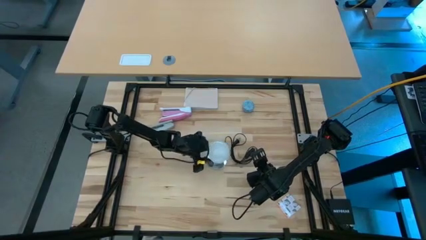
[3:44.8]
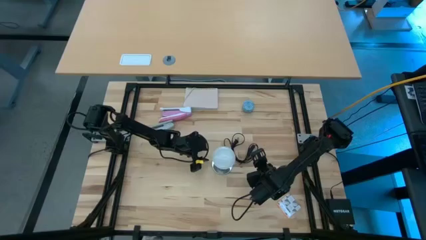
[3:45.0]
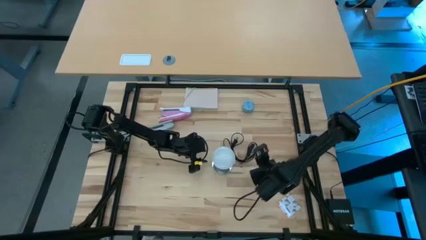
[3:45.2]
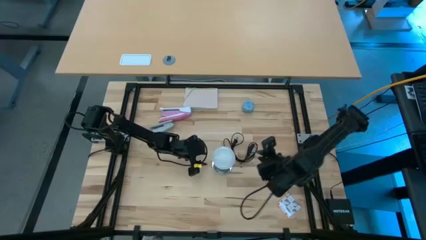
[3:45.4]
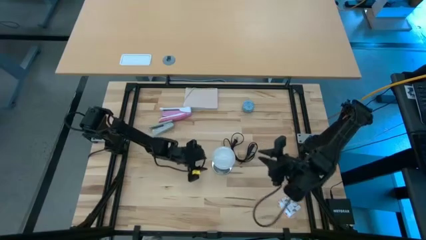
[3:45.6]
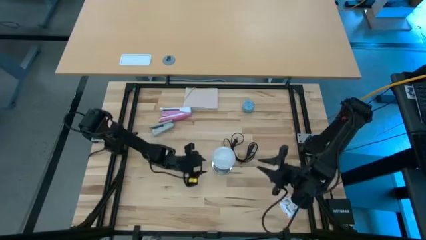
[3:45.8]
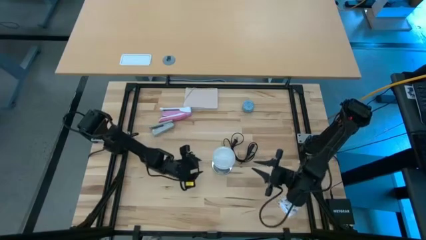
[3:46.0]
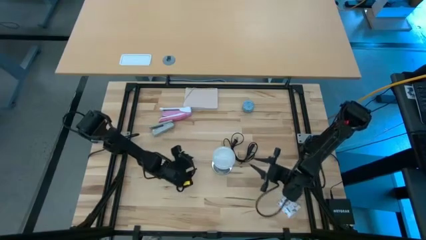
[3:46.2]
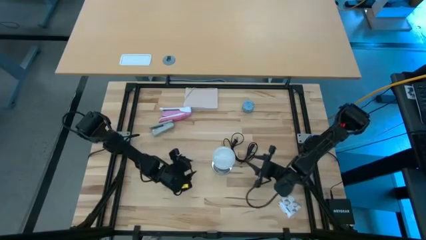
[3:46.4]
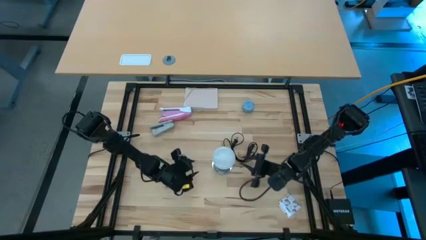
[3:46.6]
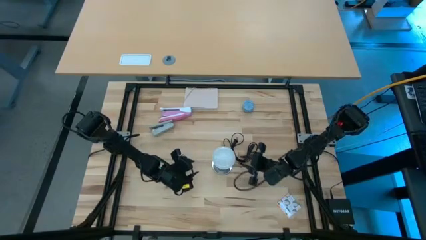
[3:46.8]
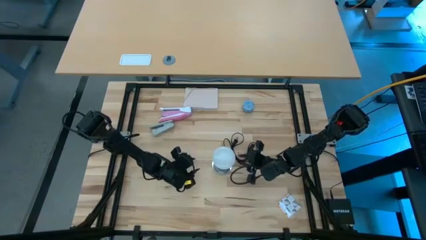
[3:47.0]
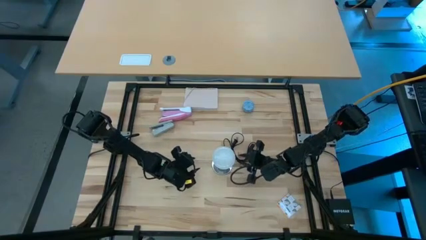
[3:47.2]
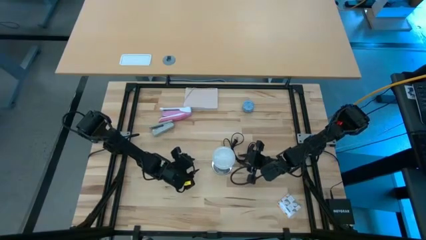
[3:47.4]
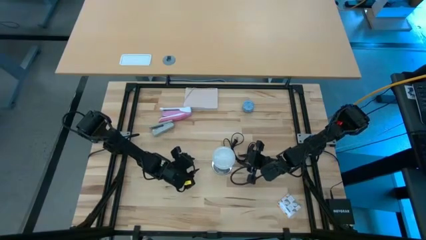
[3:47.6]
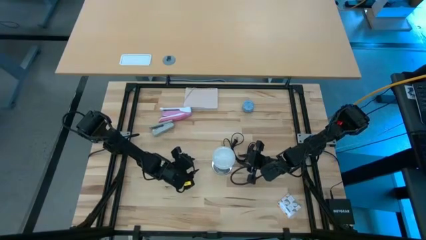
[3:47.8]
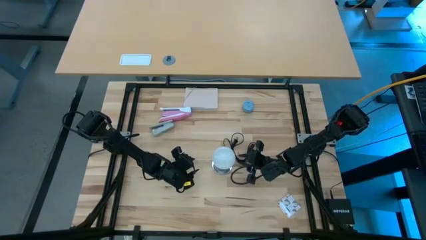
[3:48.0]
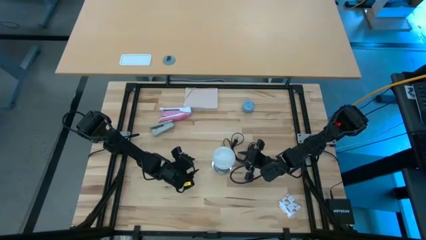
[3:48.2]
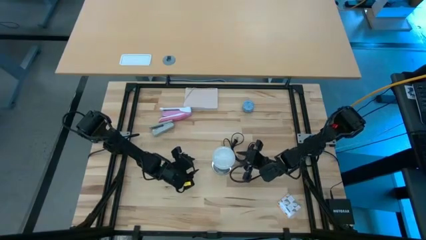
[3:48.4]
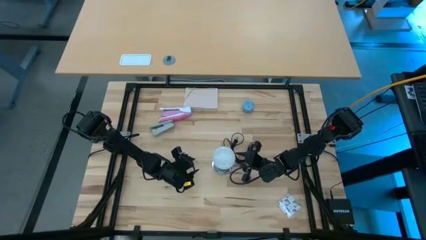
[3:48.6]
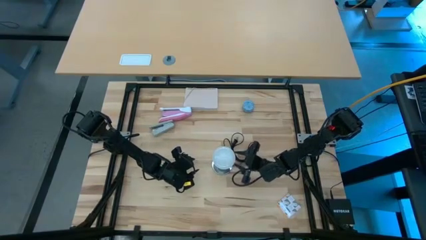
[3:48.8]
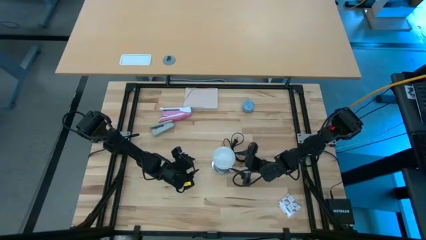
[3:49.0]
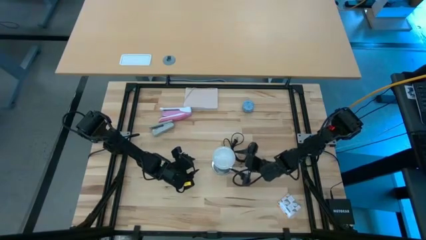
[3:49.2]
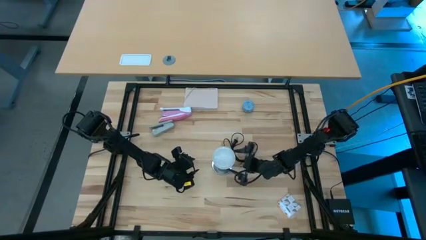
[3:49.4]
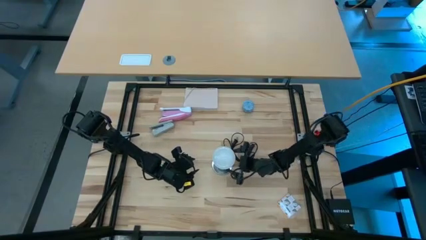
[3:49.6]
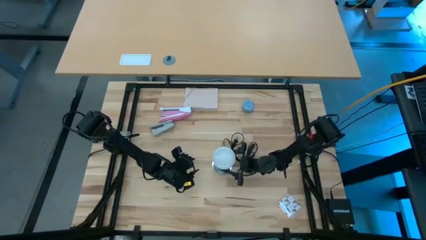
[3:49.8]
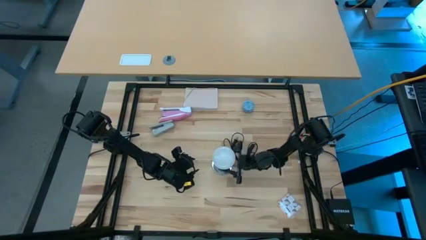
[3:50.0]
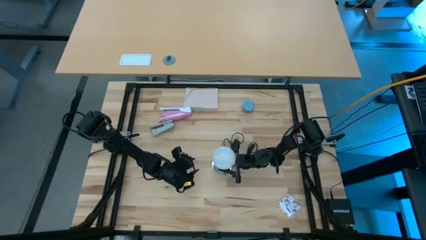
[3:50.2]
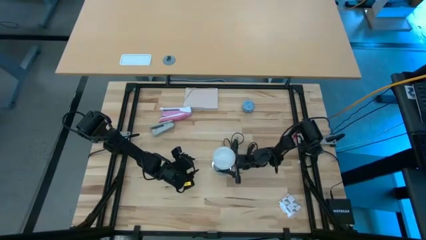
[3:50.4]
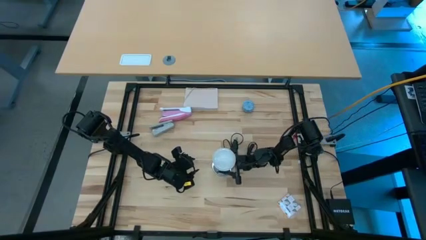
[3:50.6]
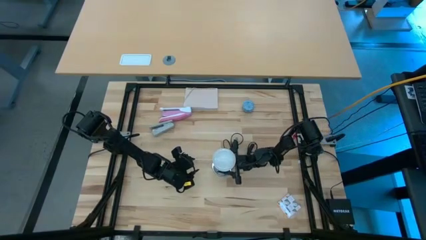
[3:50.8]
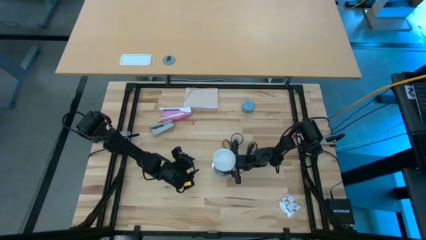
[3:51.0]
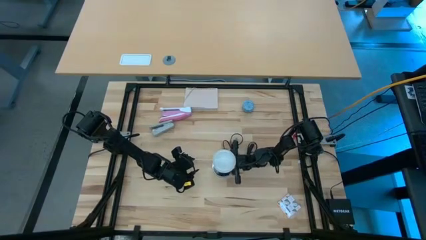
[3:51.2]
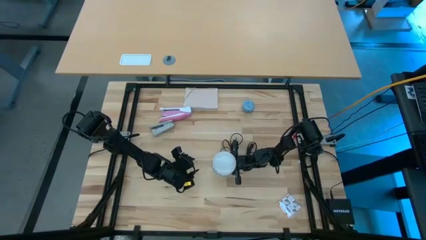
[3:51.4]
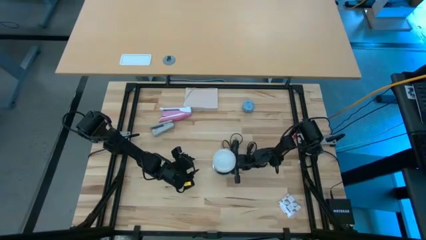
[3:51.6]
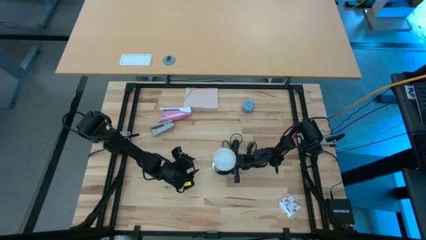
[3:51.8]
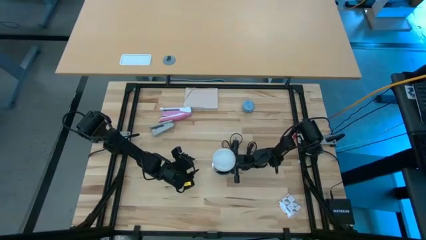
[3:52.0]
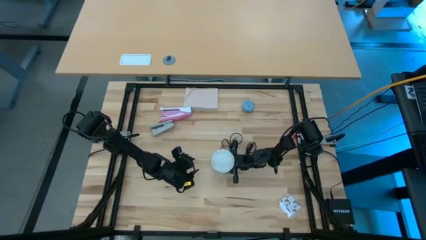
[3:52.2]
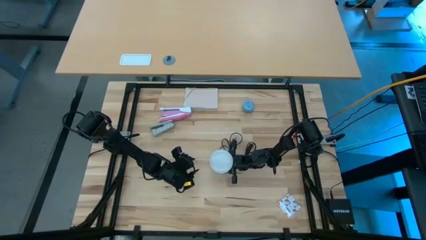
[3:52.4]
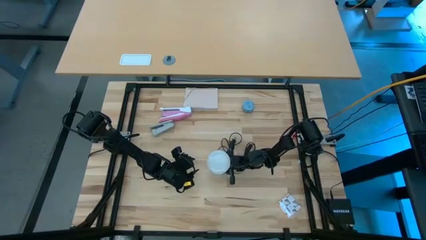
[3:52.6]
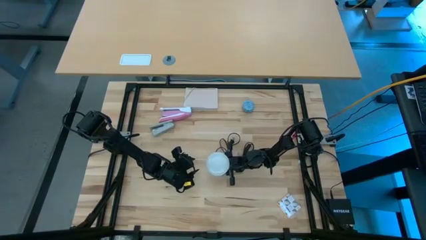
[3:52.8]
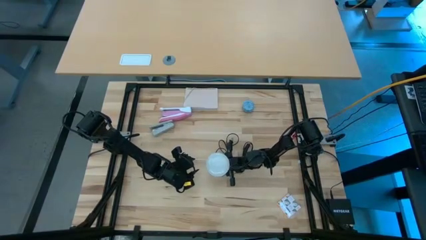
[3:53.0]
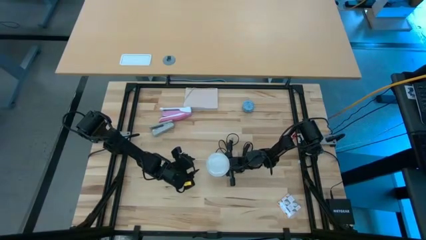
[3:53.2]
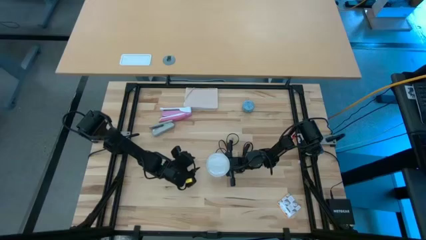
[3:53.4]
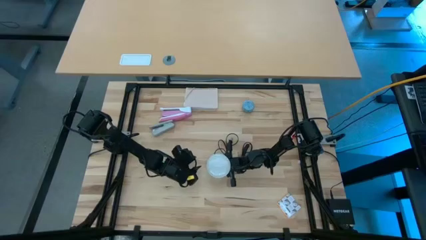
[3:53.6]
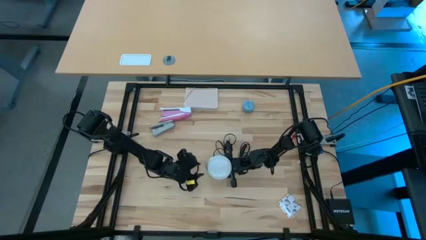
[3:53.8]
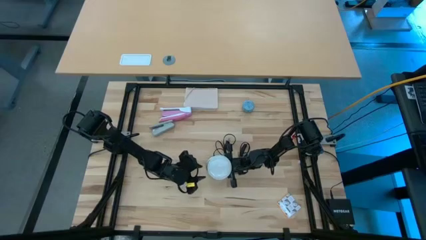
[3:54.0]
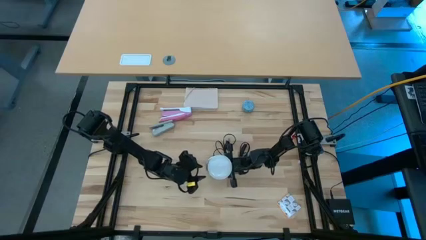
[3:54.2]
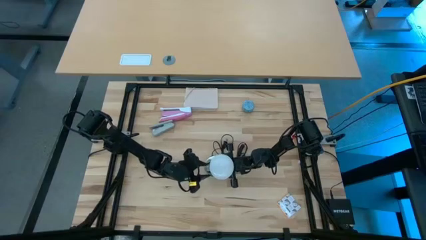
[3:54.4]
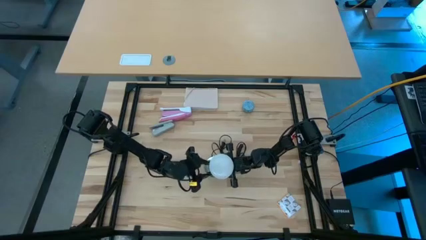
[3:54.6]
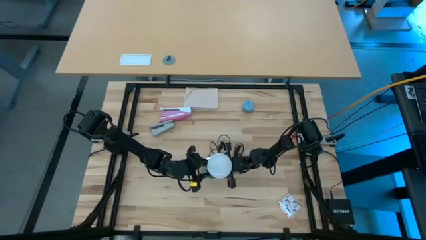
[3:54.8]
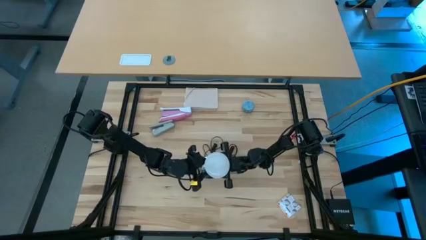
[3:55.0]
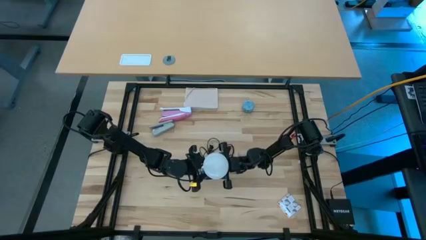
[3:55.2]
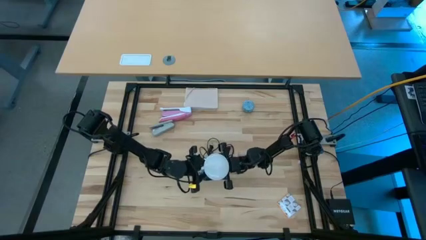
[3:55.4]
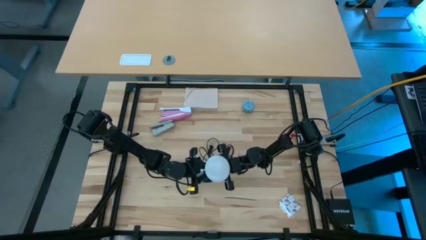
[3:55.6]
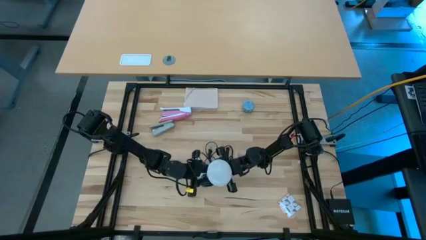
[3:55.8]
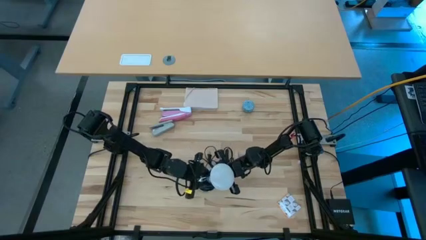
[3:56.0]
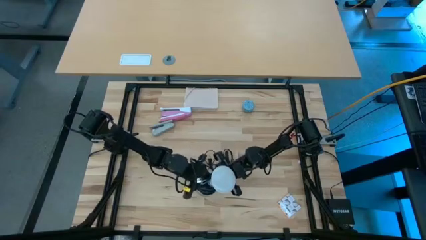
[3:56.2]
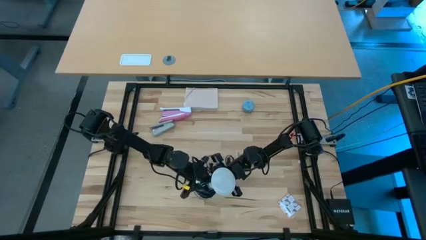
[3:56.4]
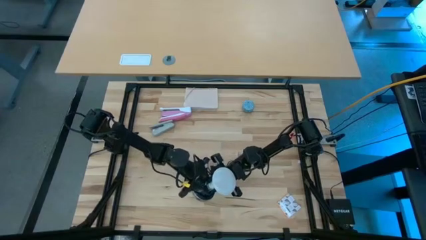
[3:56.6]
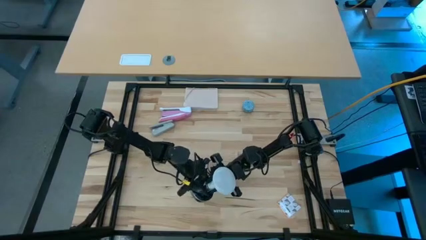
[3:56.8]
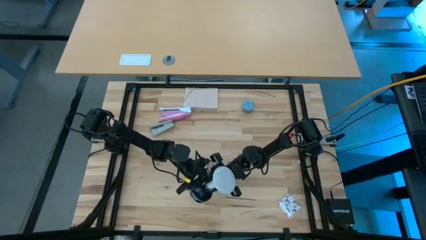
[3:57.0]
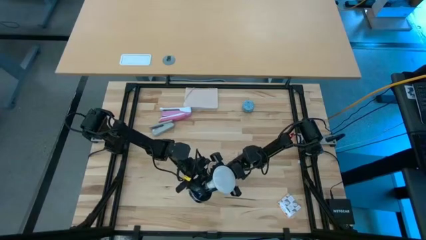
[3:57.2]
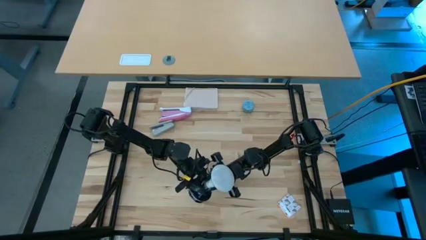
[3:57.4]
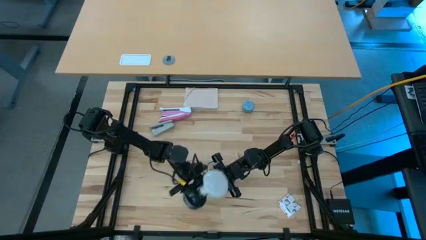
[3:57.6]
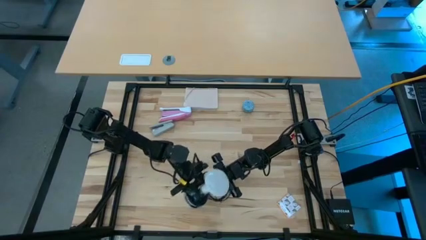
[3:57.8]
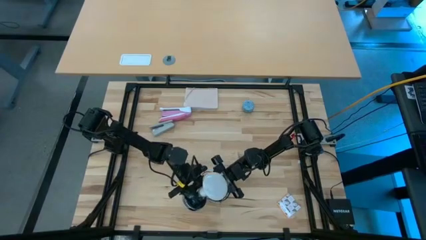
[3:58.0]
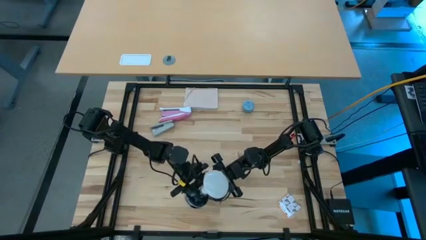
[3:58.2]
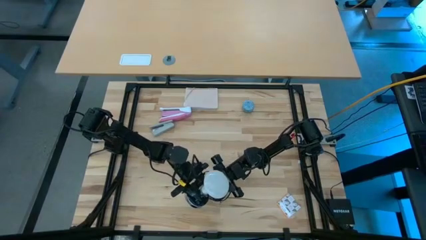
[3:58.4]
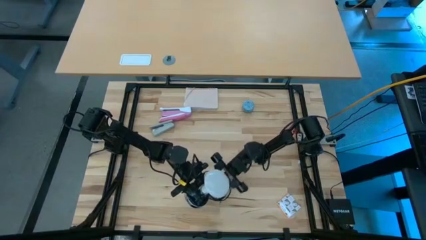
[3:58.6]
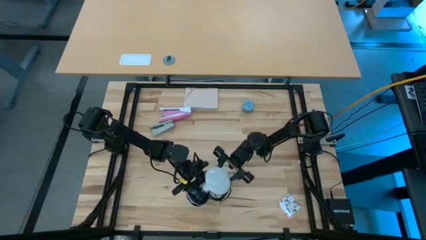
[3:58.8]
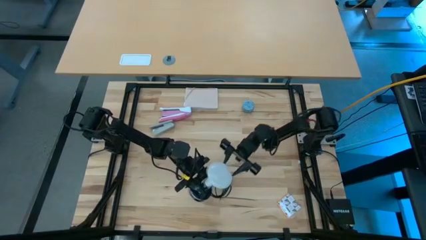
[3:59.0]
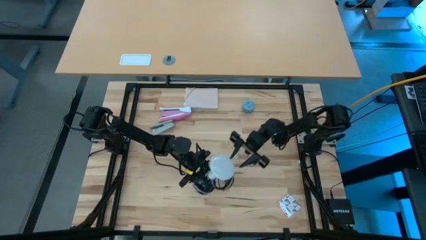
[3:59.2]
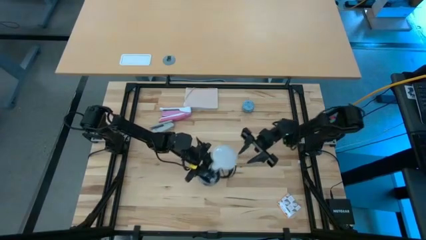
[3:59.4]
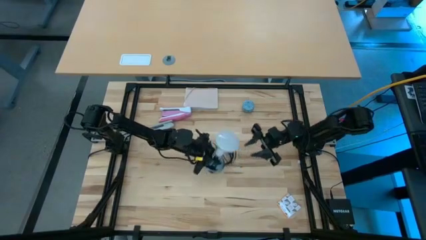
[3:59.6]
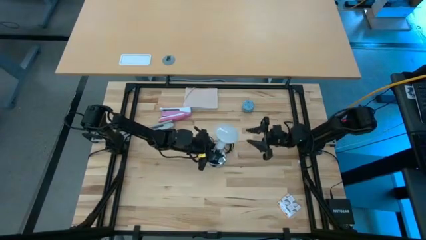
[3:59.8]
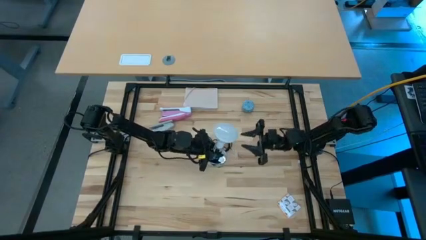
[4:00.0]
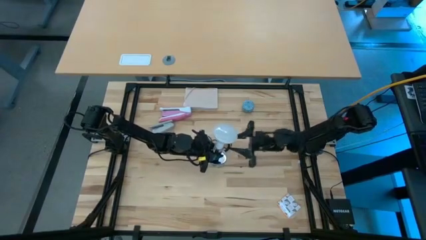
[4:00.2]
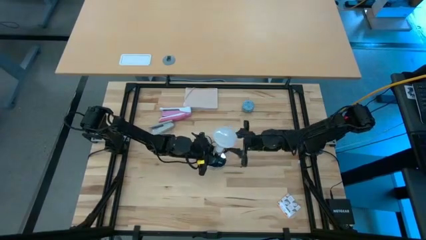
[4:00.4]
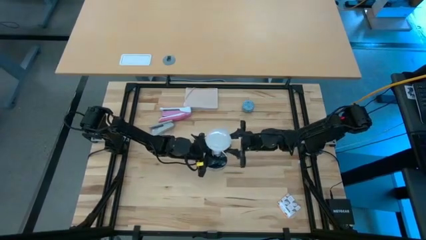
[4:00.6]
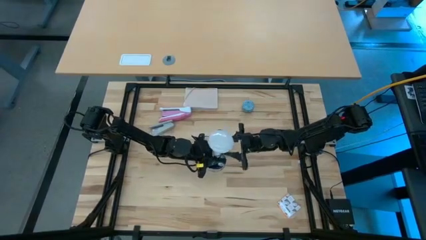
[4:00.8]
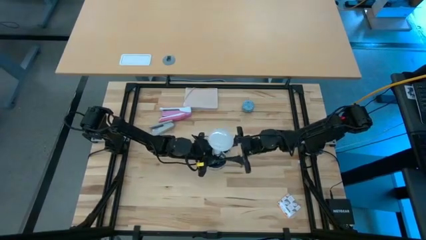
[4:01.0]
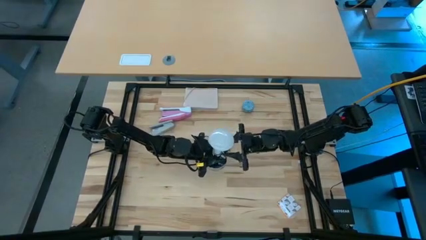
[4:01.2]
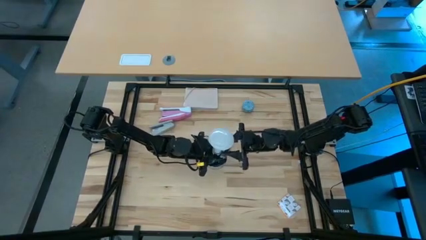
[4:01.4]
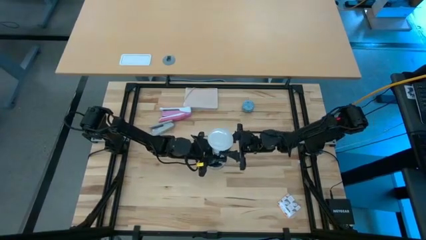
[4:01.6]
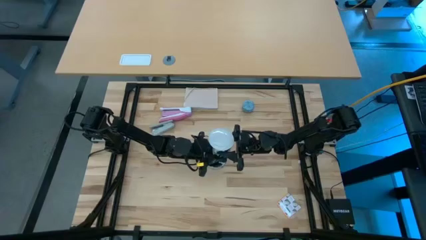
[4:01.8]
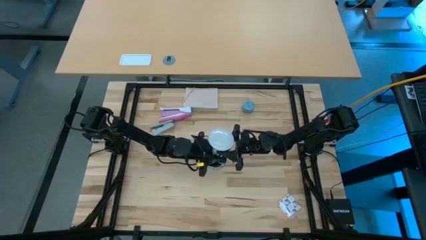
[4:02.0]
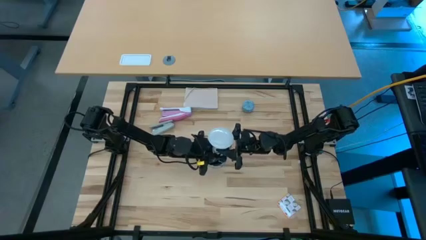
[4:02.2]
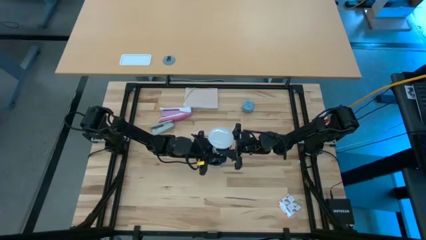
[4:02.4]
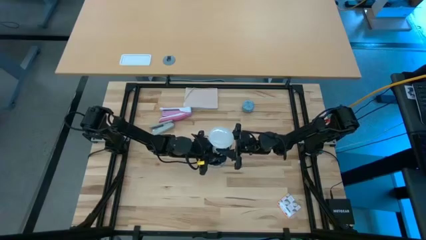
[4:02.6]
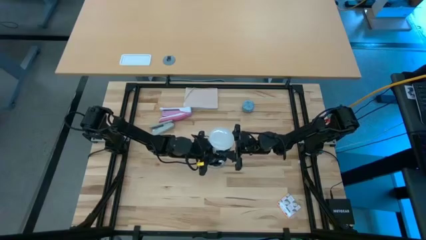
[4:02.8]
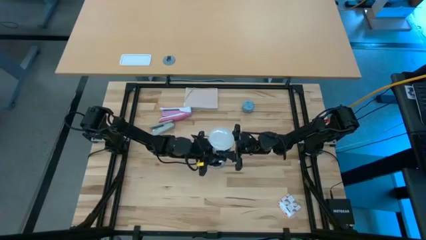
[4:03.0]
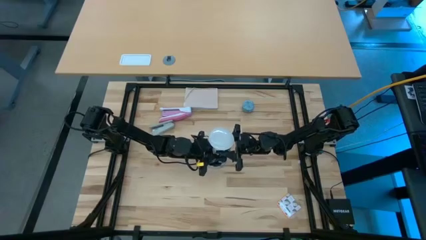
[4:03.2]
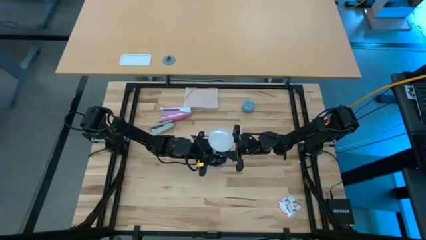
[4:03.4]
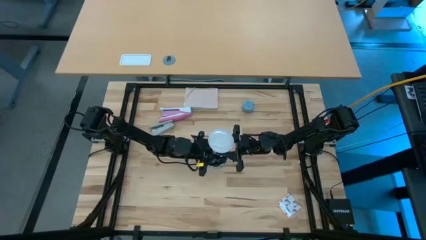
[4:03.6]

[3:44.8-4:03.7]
Task: Screw lightbulb
Remove the white lightbulb from the desk lamp
